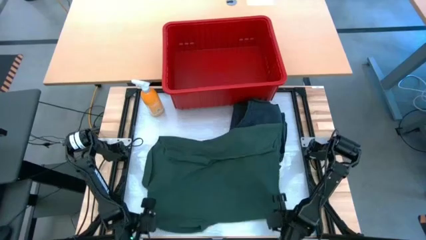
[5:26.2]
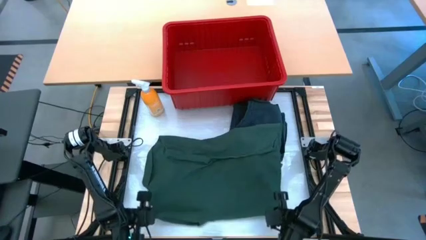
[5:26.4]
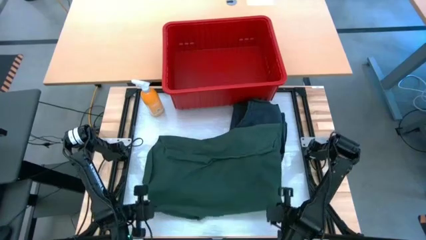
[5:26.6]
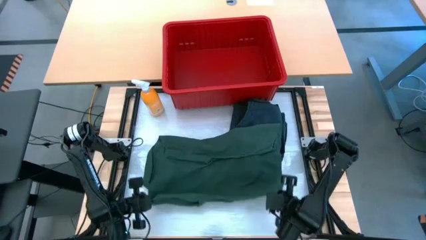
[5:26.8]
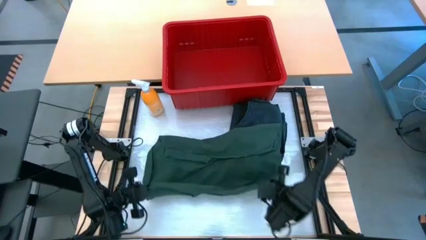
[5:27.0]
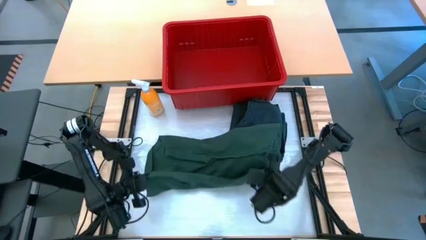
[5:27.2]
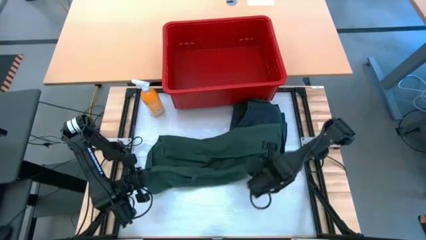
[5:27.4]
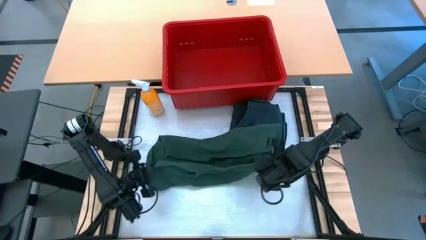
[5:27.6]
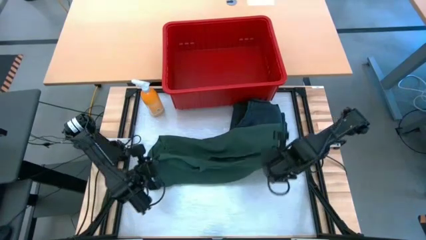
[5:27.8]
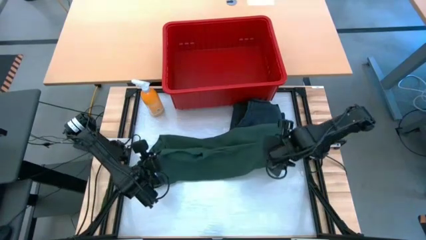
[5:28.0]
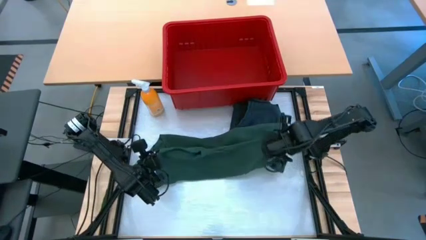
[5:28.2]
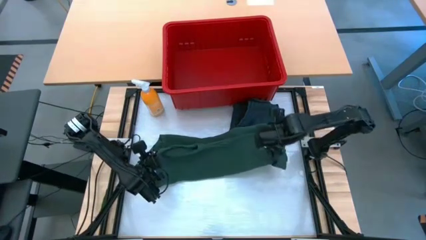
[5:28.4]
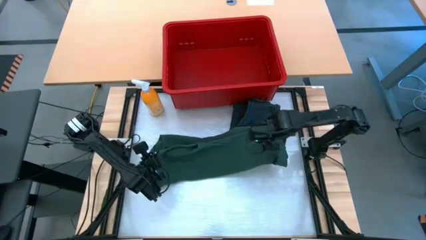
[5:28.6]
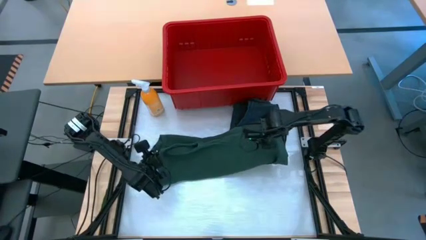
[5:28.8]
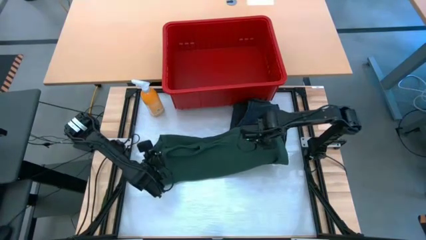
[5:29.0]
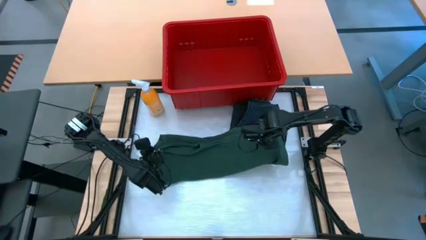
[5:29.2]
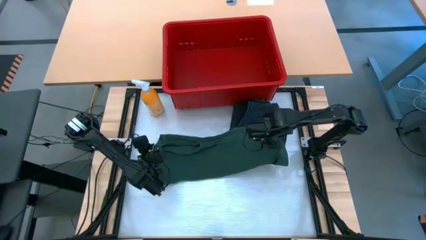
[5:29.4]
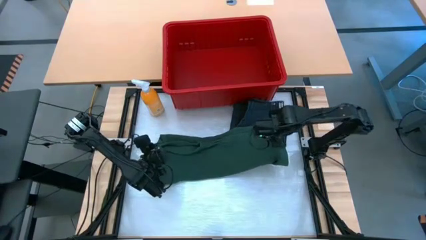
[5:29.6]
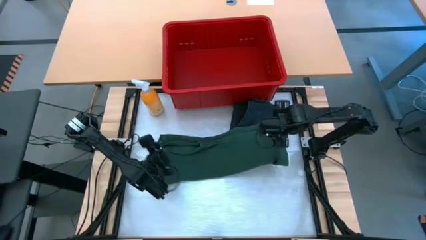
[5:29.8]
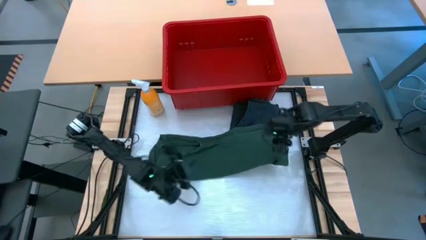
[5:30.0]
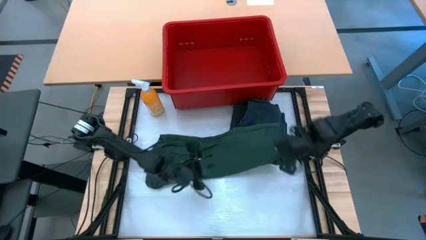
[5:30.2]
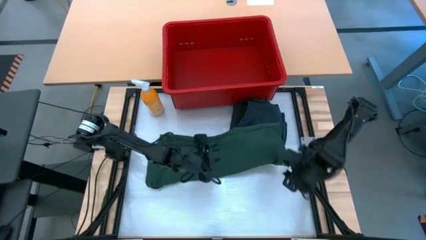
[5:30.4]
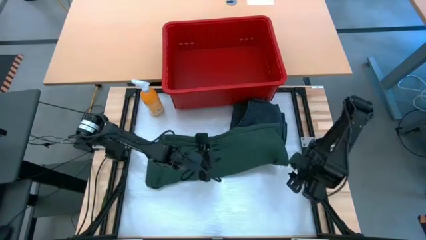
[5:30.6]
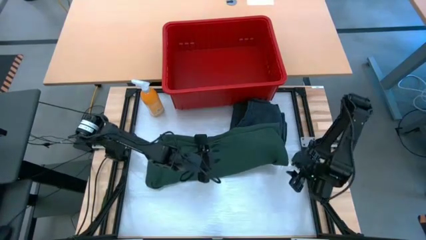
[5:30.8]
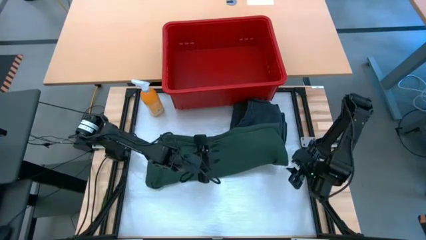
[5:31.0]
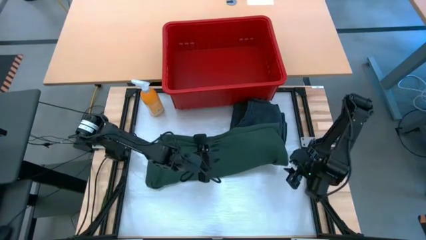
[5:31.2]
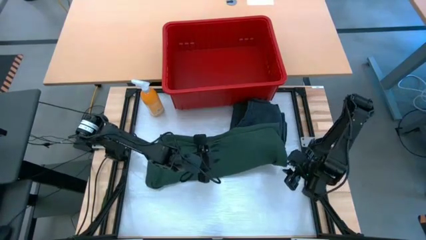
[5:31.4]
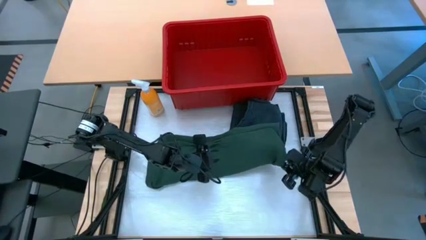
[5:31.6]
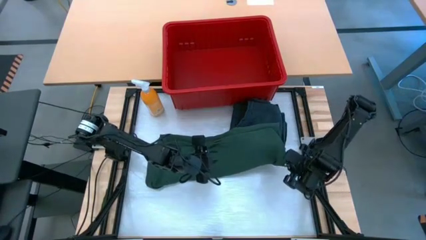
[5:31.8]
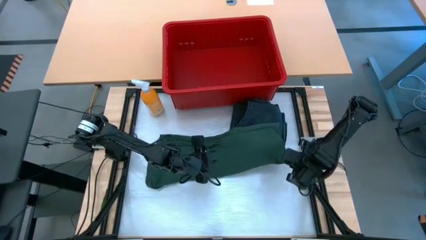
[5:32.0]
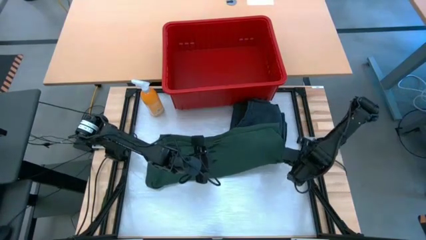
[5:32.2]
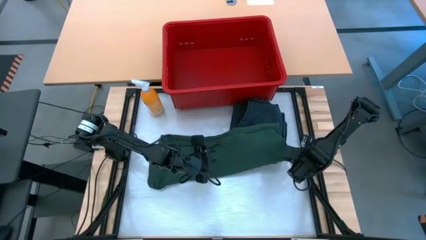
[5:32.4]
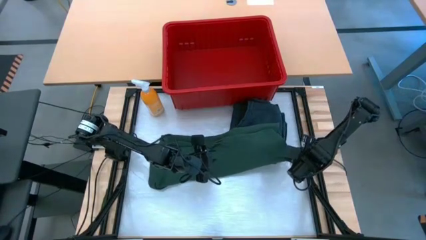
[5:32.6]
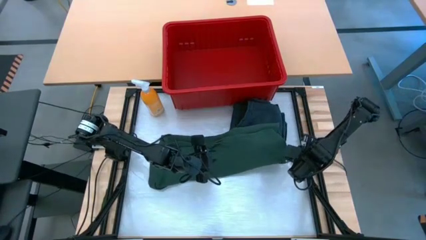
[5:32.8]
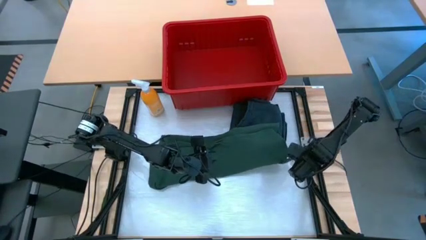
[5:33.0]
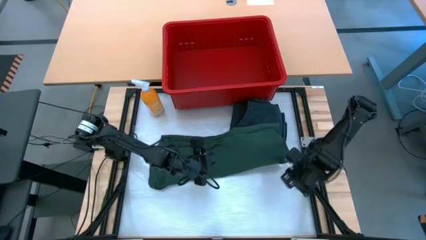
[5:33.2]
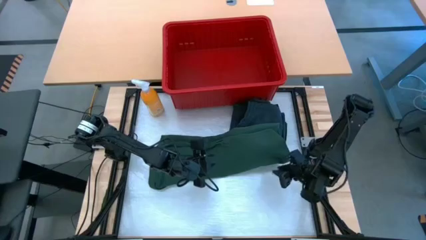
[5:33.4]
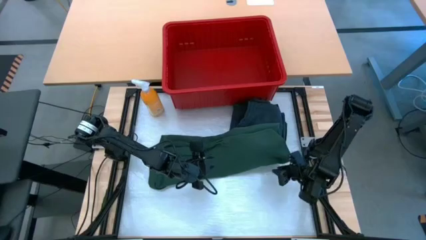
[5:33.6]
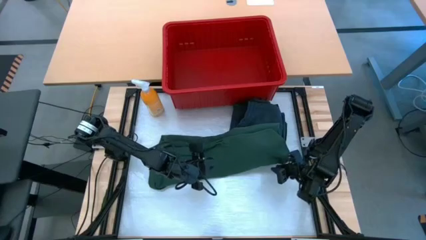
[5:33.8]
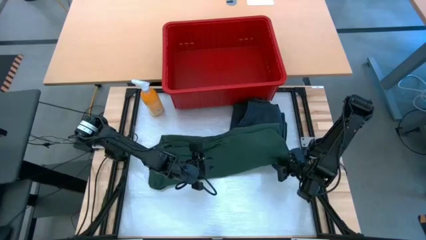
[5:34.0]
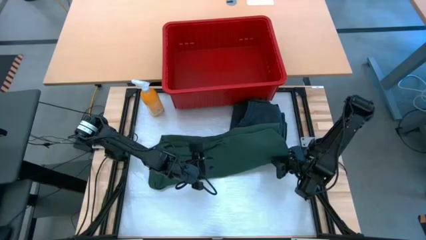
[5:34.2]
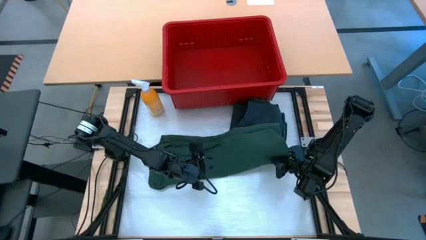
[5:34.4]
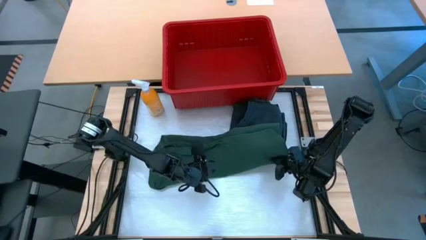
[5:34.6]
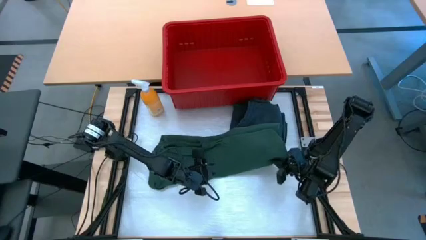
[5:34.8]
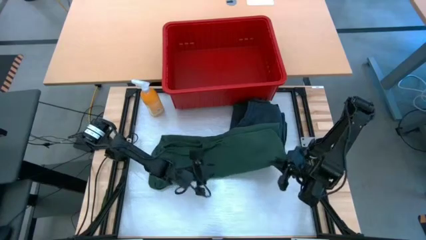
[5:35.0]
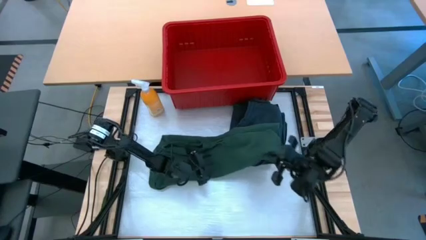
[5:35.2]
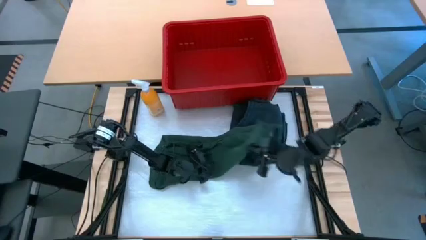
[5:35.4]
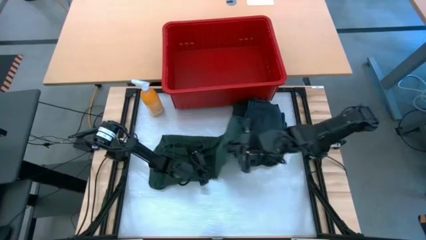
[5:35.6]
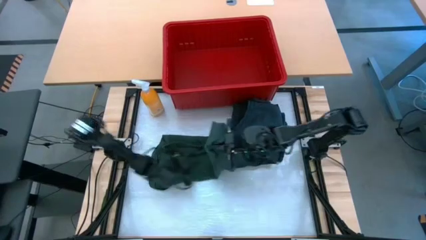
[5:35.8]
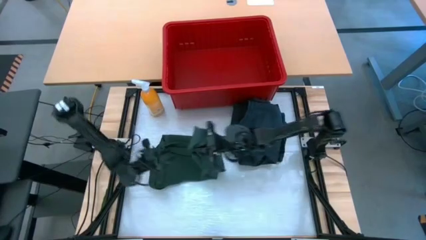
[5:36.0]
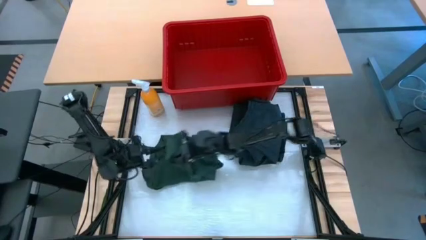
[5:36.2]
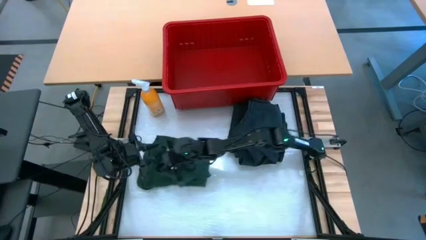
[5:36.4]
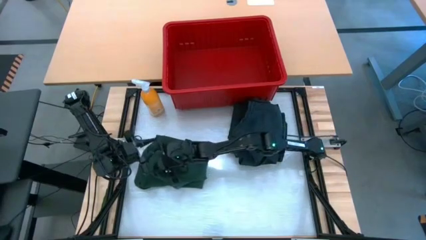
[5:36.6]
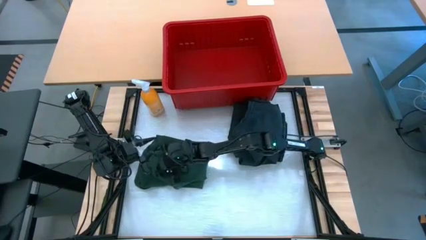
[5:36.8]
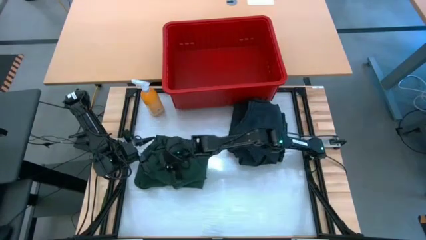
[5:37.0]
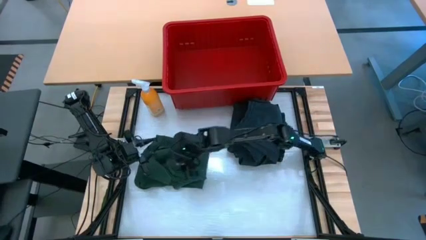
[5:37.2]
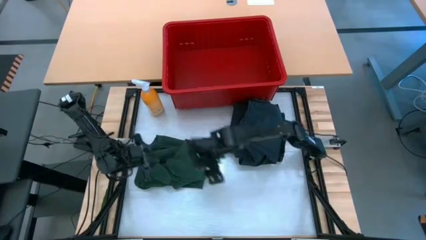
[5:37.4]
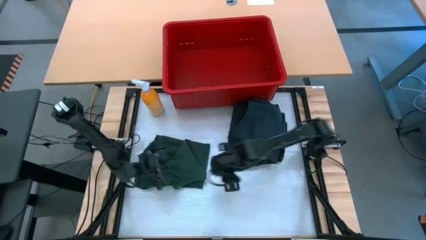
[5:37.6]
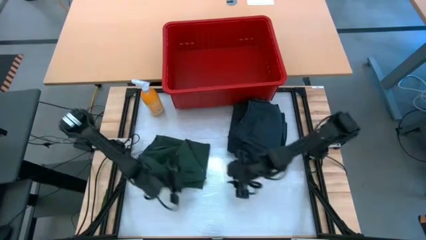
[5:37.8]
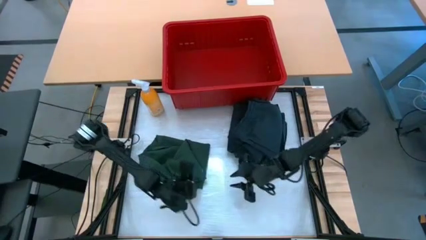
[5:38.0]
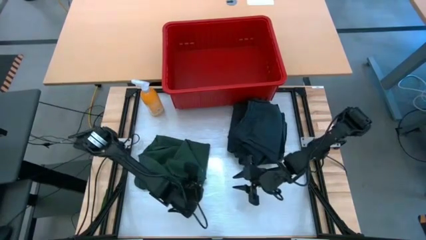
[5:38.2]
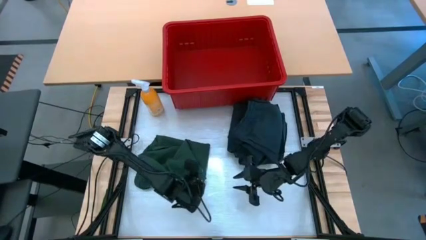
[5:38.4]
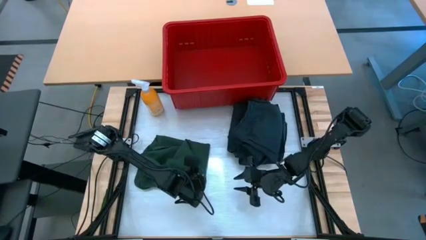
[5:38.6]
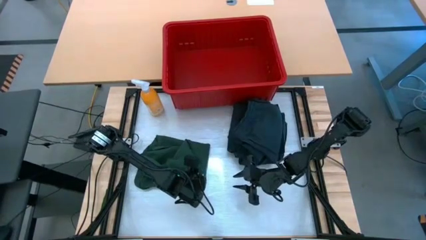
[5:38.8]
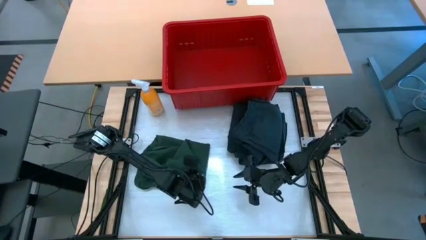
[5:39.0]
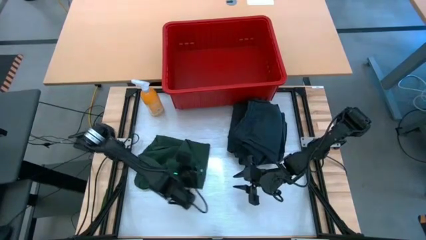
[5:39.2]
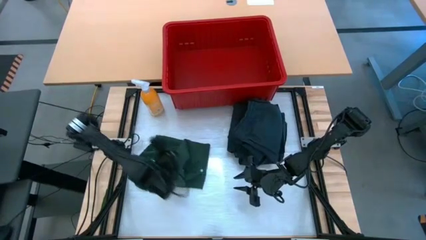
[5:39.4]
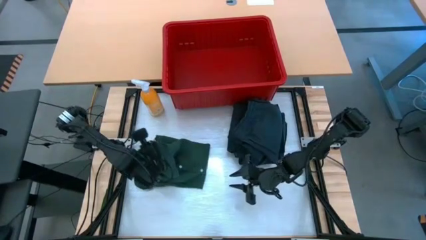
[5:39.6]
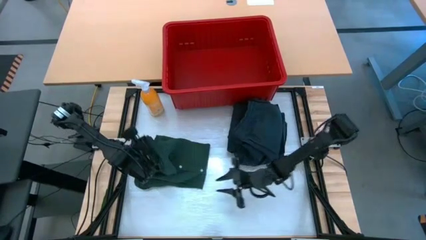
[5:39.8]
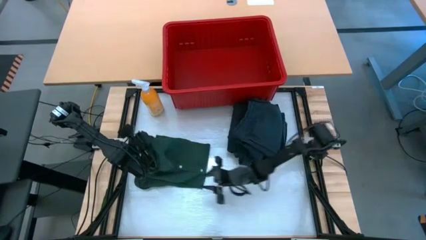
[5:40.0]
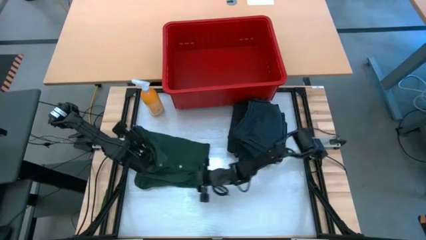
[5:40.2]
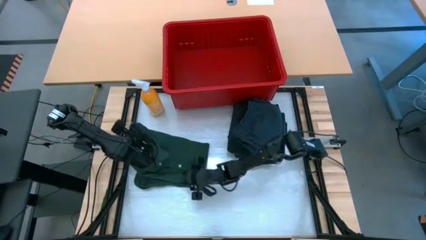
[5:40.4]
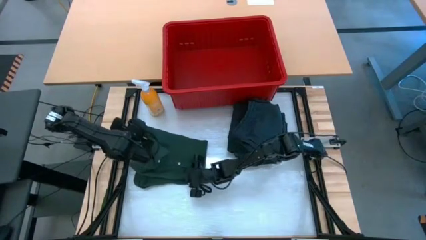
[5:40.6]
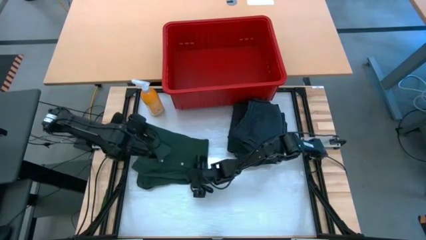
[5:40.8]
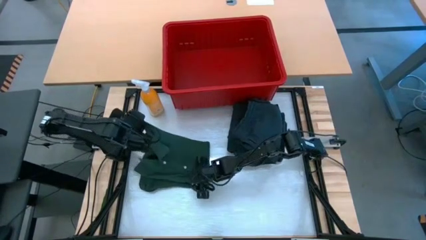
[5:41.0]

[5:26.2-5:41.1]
Task: Fold Laundry from Bin
Fold the green button down shirt
